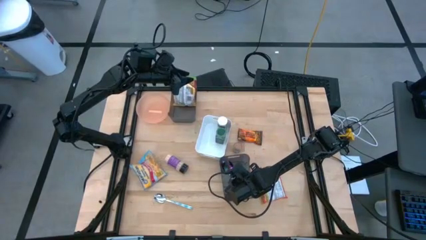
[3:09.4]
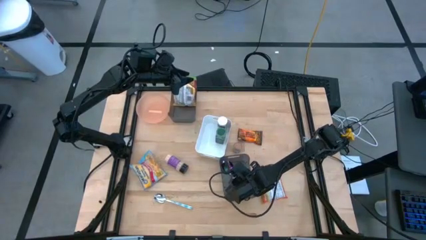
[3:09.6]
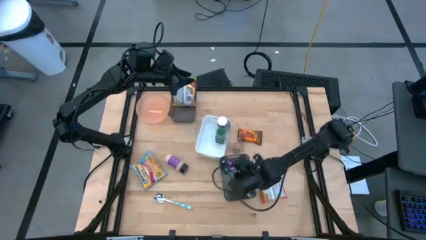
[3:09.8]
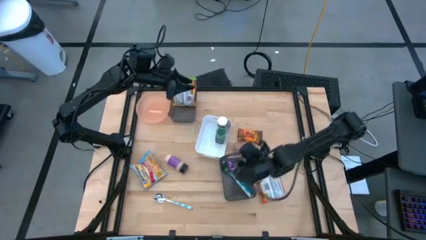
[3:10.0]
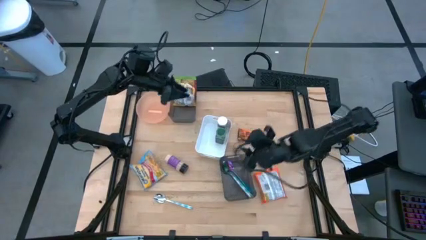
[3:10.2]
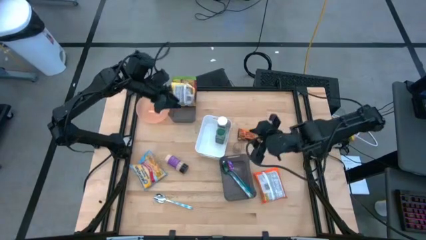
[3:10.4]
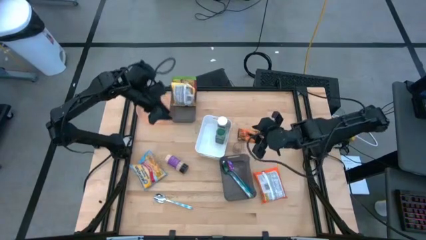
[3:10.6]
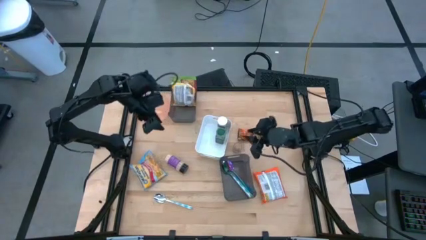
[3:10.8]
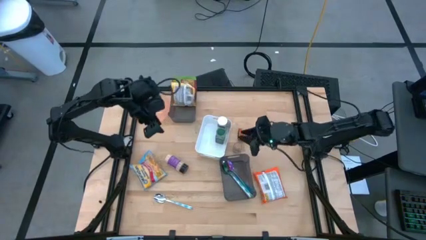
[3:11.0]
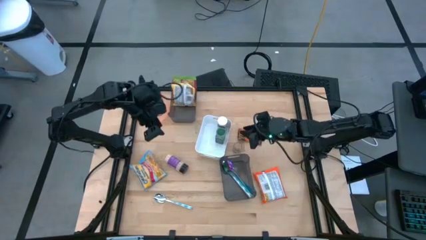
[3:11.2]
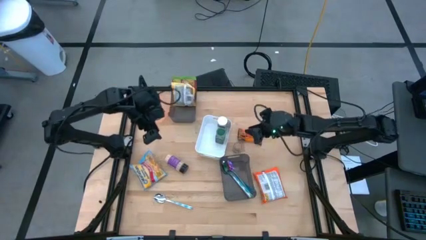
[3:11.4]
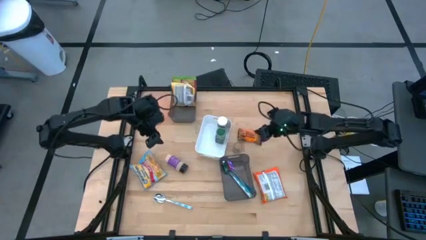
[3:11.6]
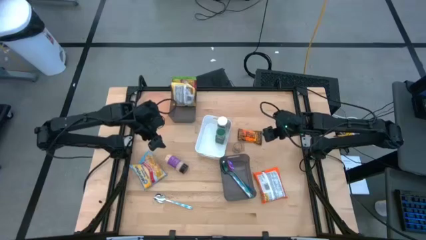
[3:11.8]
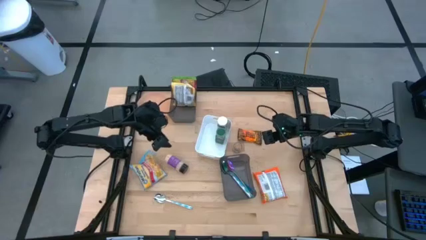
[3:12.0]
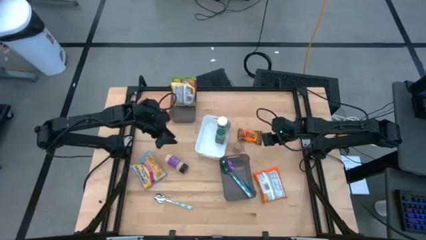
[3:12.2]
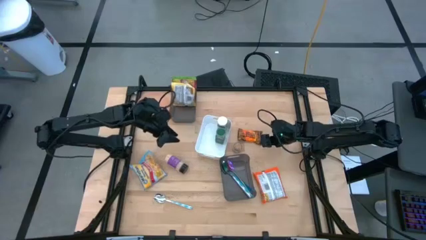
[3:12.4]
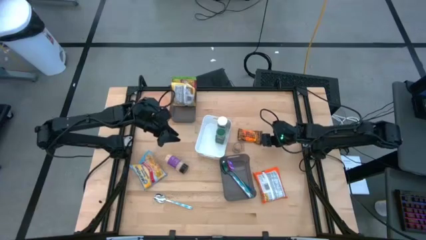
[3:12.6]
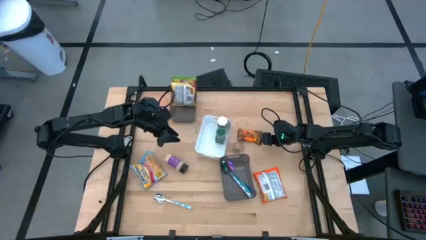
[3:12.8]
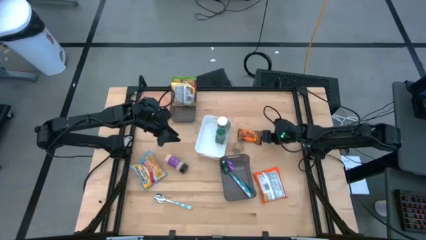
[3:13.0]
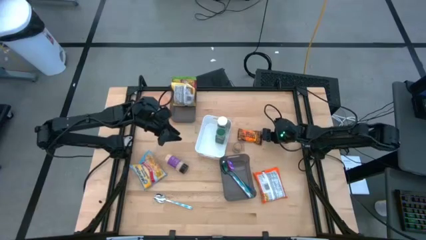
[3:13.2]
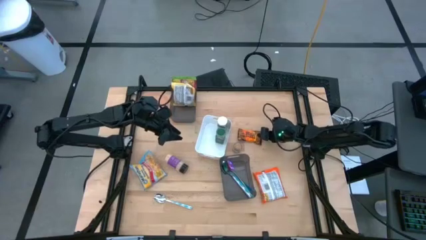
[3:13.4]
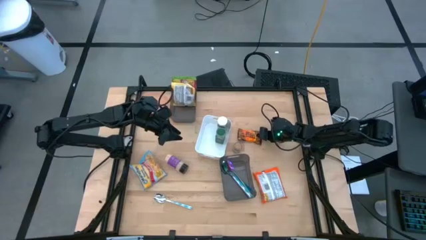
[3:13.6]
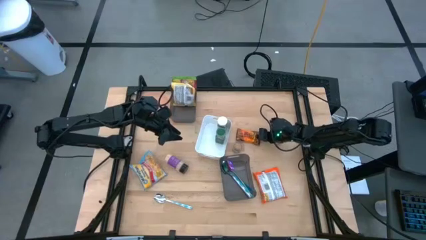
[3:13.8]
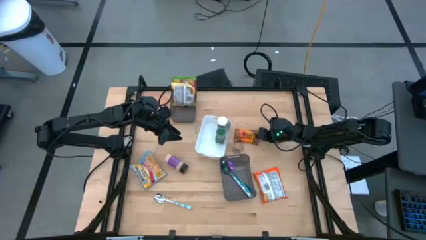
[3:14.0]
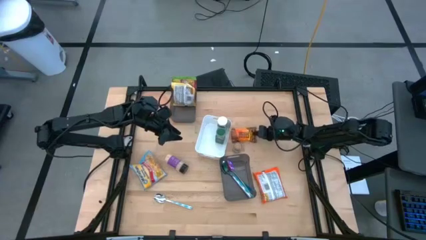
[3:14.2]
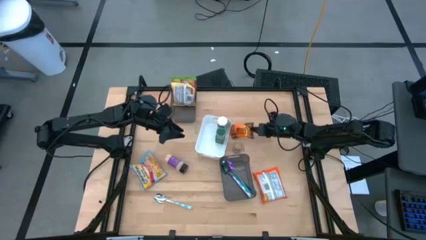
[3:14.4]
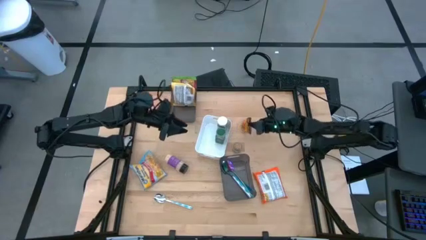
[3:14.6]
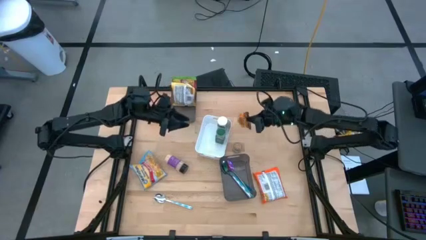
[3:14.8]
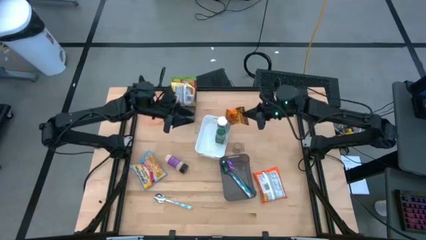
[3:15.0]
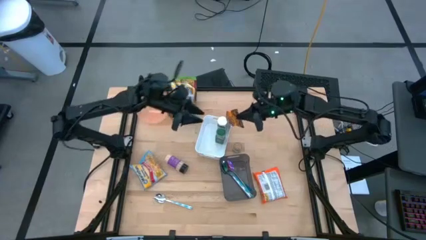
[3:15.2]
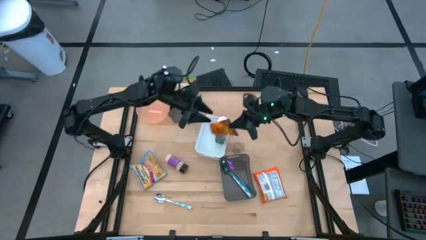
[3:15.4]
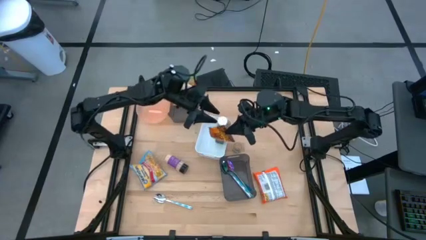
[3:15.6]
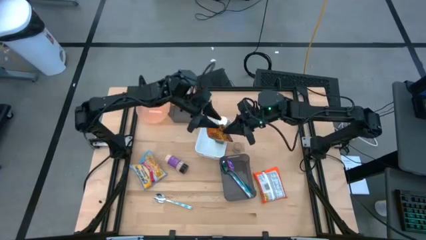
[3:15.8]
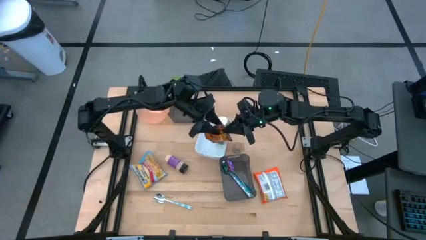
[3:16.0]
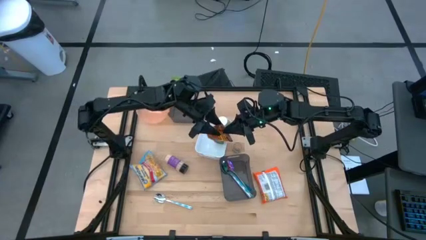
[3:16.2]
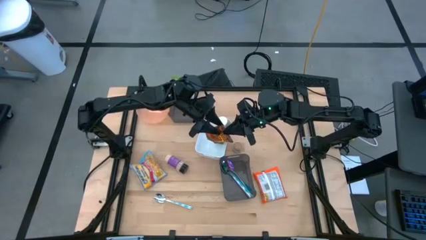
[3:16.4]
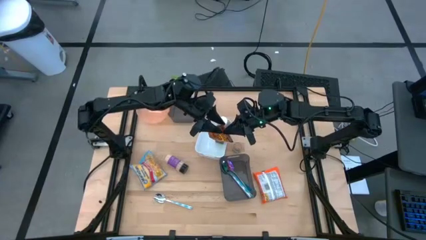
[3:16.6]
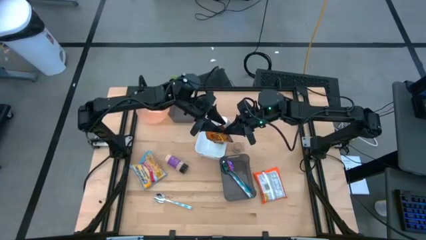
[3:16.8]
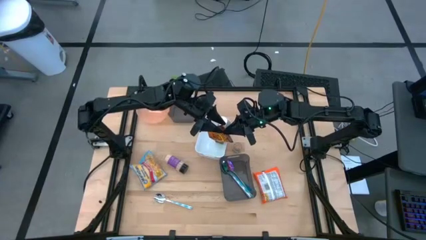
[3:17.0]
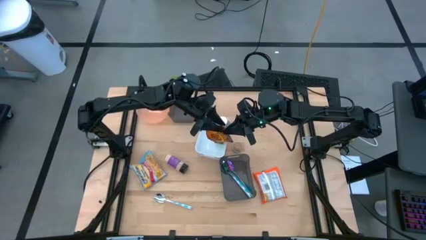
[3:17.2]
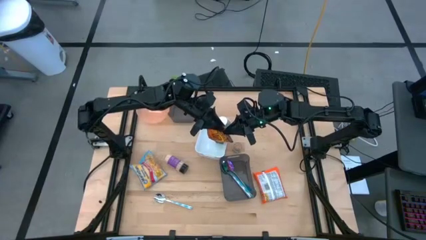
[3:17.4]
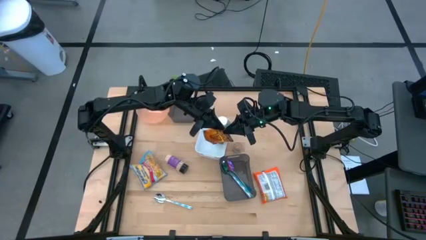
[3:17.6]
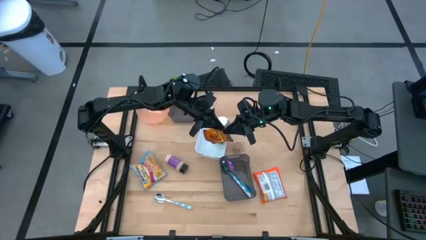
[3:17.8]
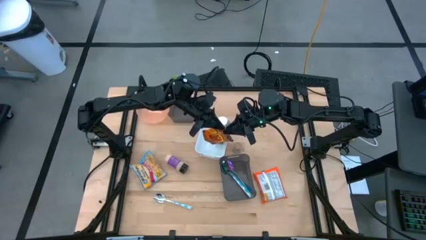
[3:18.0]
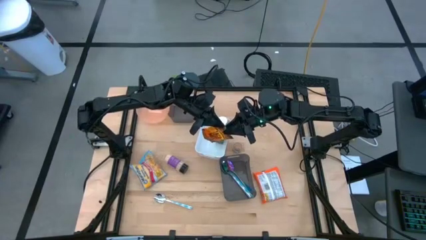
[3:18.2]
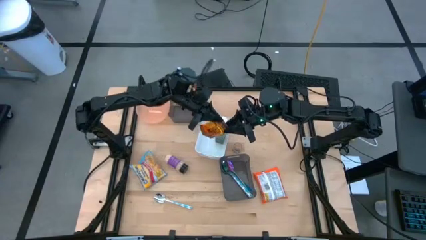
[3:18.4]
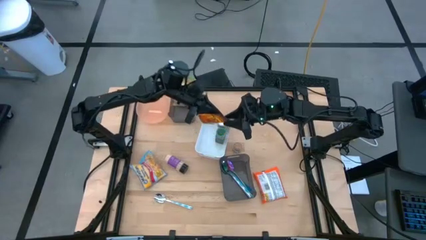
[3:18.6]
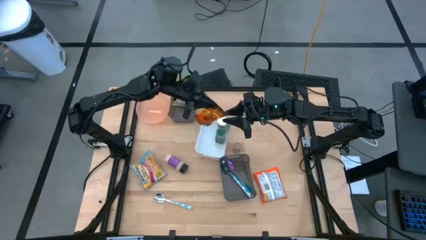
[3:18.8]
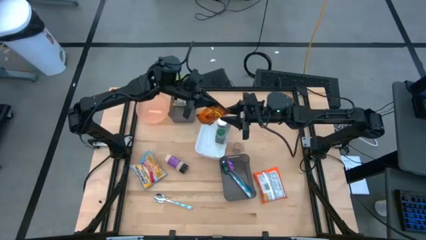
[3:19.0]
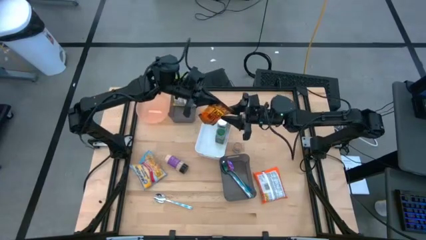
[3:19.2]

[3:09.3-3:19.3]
Task: Pick & Place Food Item
Put the orange seasoning pack into the white bin

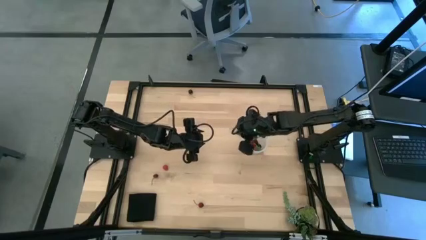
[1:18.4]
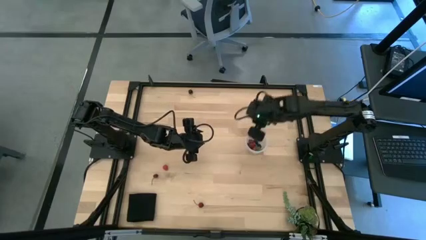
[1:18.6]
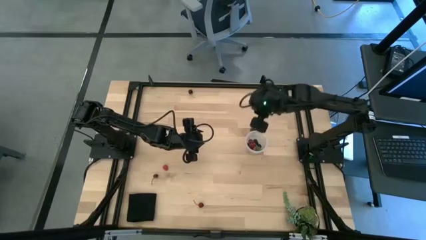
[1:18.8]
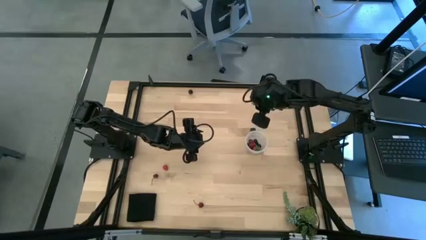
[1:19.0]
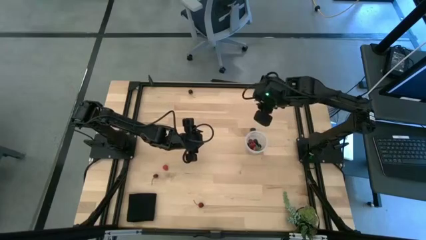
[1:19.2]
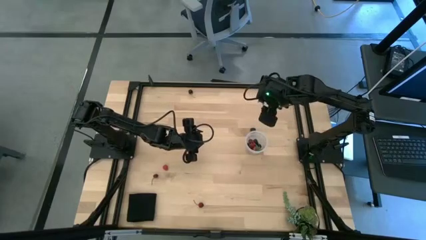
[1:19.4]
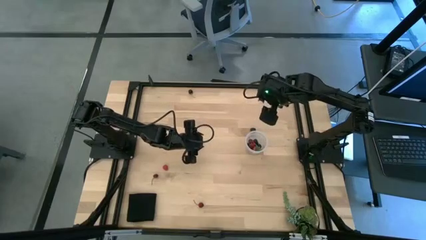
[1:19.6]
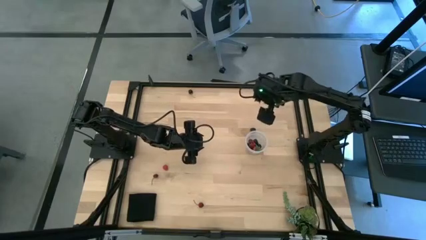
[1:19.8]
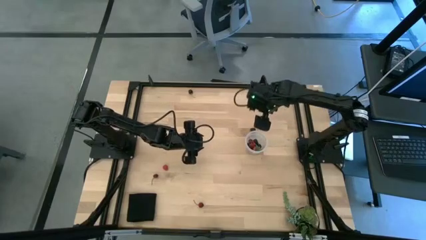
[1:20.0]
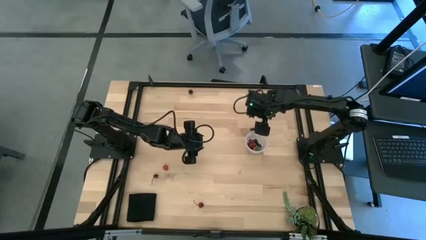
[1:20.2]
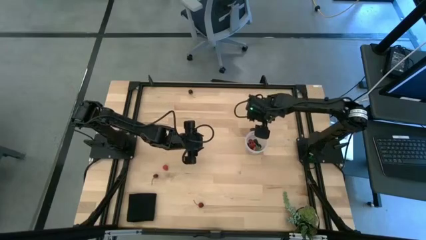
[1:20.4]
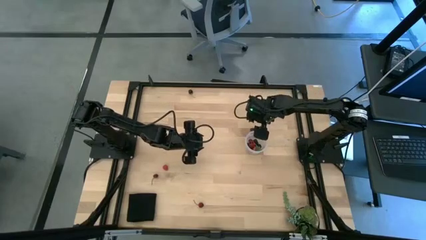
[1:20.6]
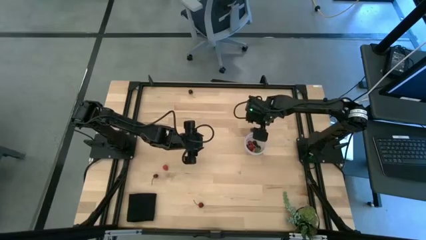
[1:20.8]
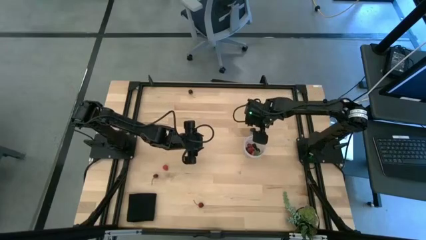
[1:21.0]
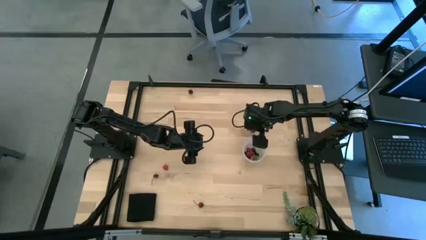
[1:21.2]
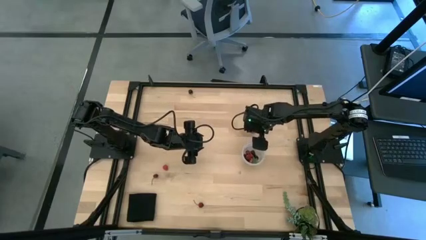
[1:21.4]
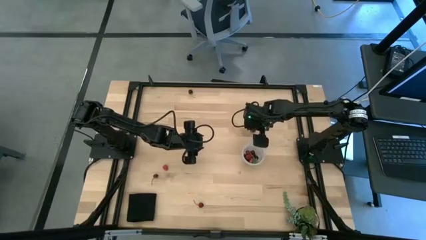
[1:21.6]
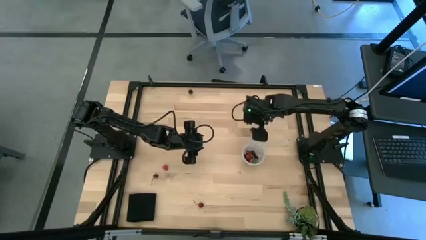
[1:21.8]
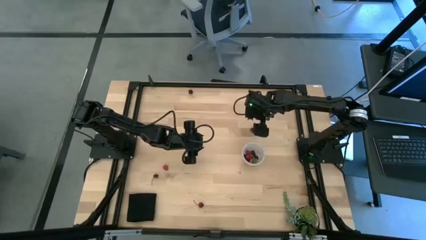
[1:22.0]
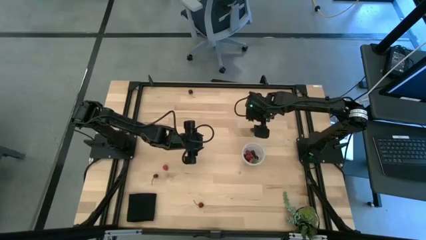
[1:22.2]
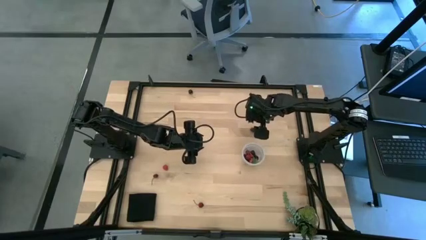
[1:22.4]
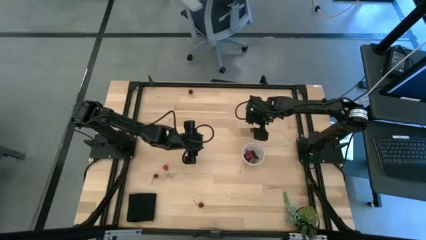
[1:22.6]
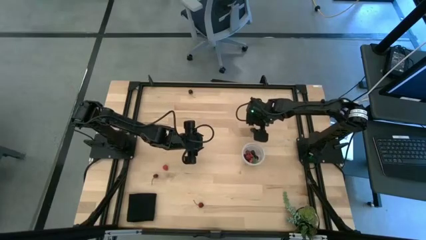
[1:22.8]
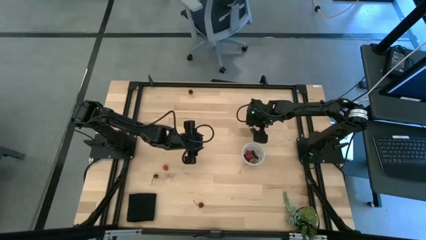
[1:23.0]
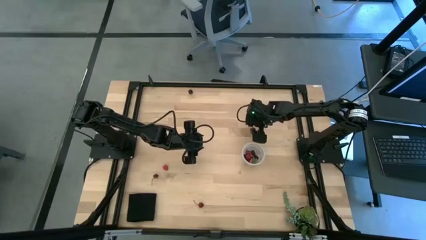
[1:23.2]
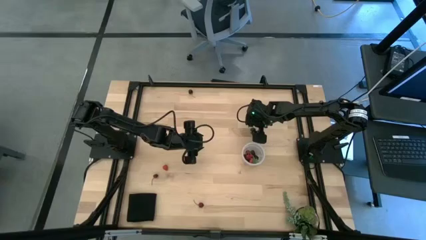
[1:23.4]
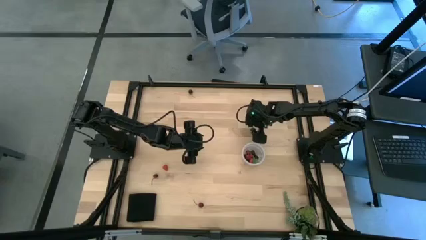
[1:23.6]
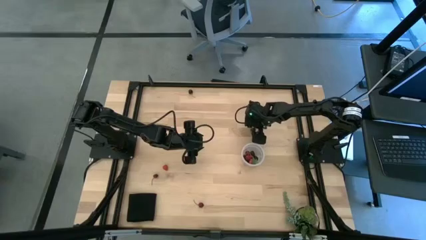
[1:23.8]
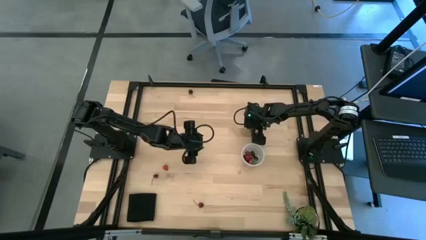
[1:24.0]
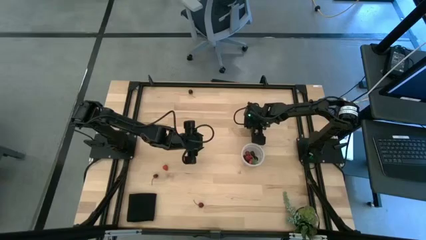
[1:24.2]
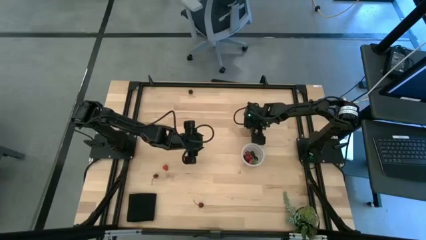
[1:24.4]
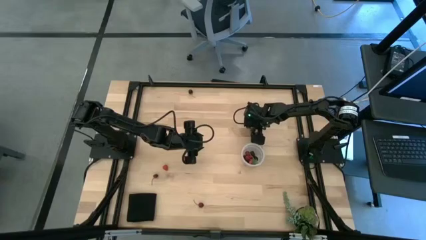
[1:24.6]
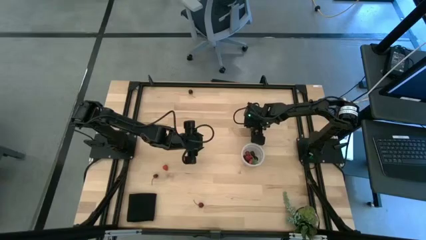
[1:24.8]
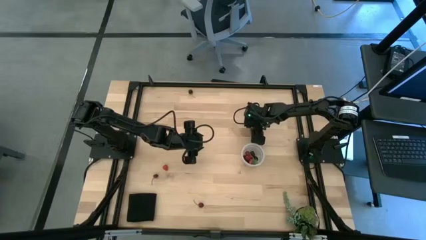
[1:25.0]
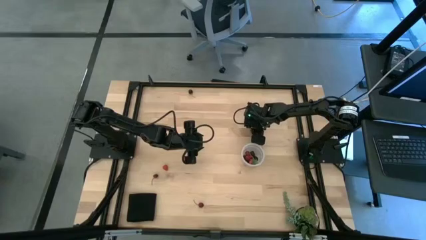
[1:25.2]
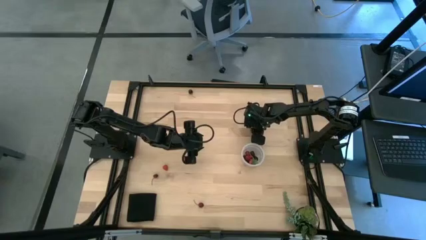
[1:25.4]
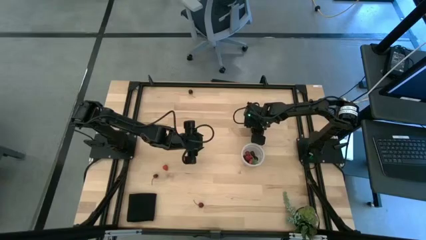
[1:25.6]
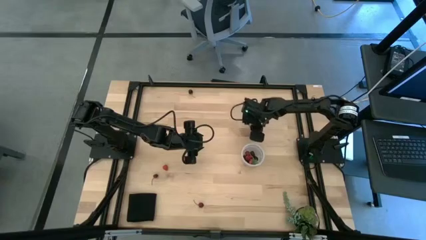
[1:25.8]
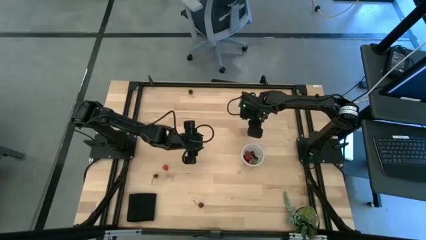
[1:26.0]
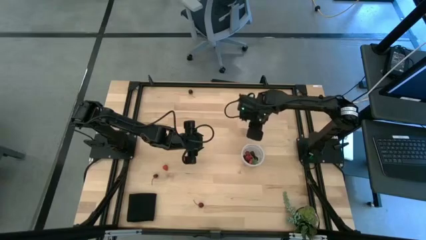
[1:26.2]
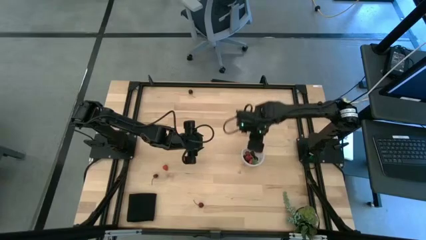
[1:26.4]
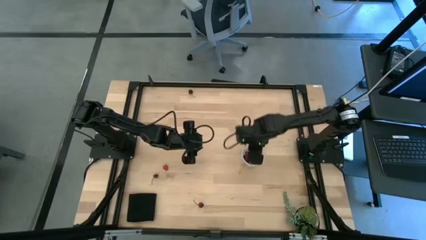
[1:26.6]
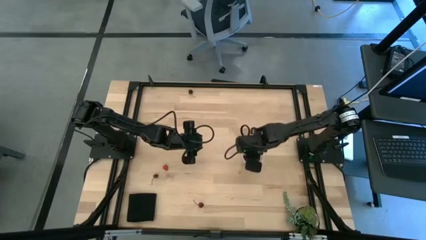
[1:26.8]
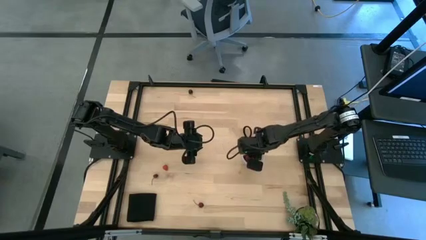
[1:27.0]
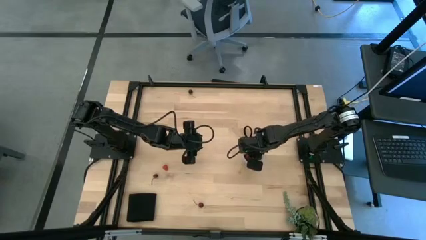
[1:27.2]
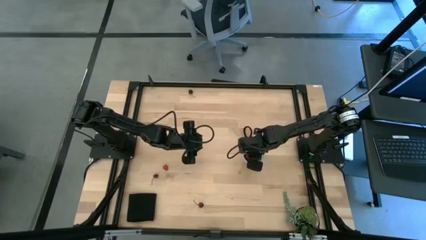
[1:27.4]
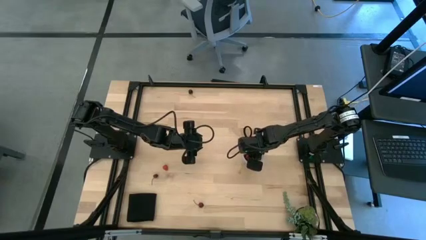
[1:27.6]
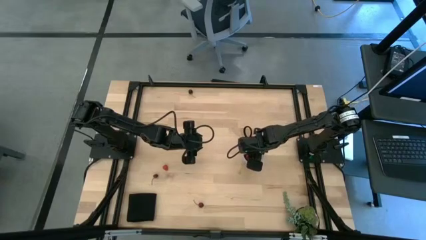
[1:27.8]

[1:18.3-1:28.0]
Task: Pick and placing Produce into tupperware
Put the blackberry into the transparent bucket
